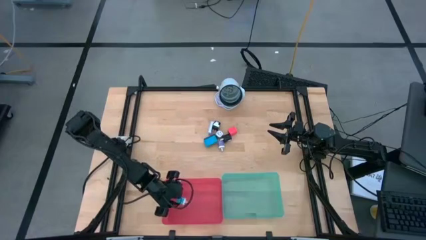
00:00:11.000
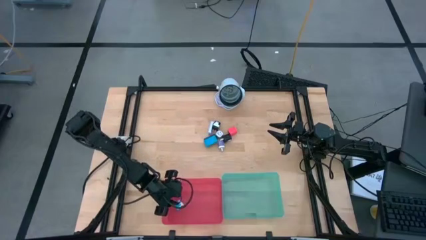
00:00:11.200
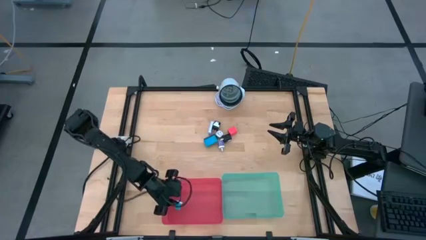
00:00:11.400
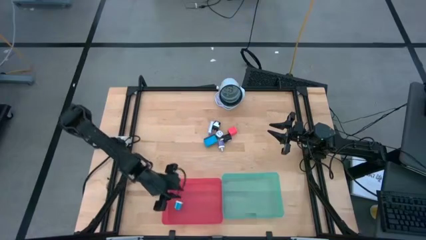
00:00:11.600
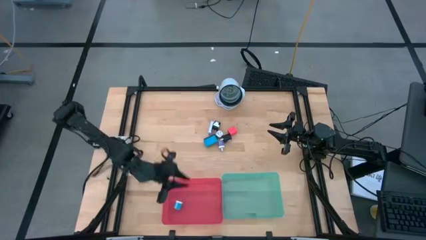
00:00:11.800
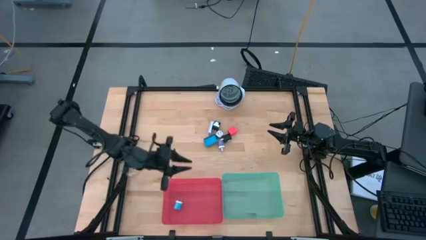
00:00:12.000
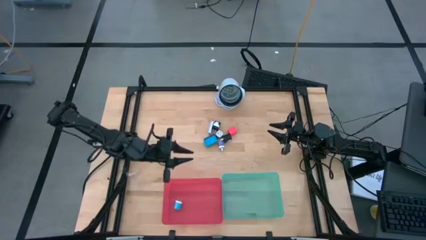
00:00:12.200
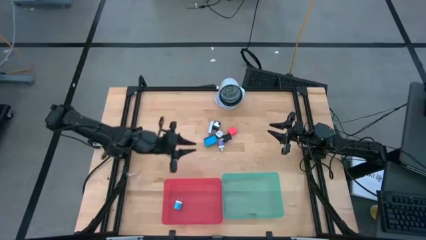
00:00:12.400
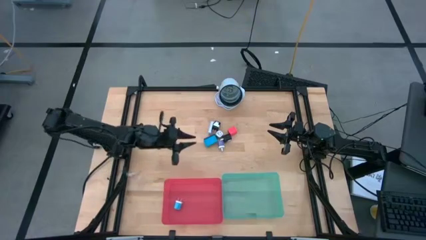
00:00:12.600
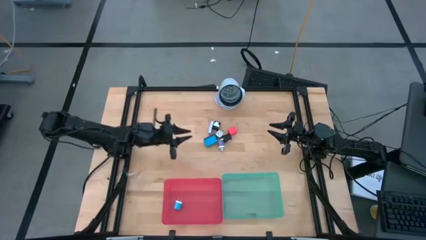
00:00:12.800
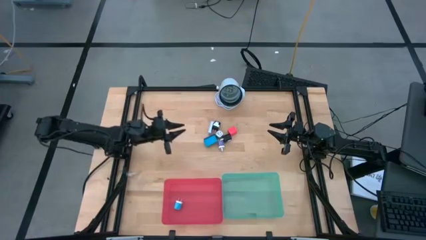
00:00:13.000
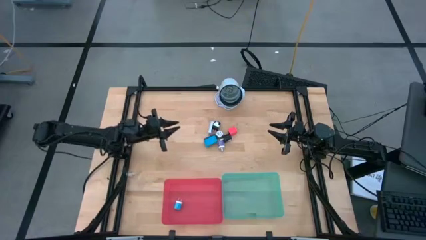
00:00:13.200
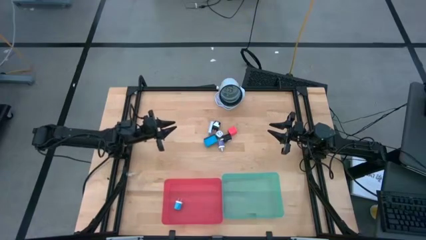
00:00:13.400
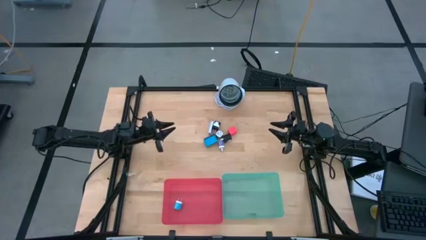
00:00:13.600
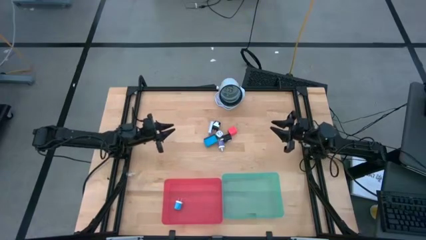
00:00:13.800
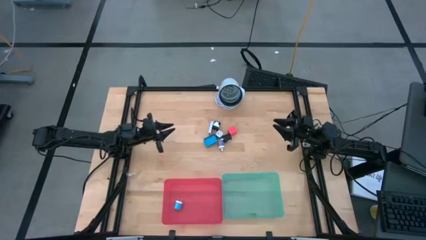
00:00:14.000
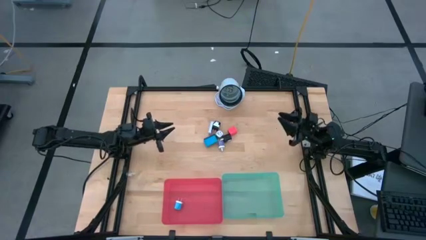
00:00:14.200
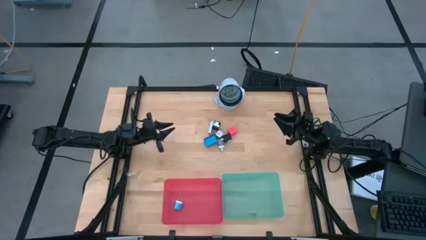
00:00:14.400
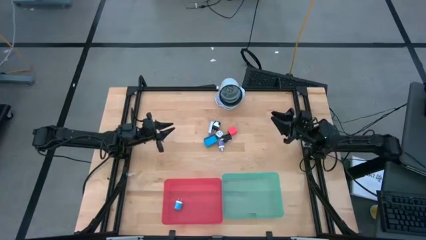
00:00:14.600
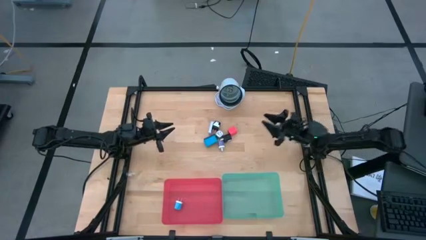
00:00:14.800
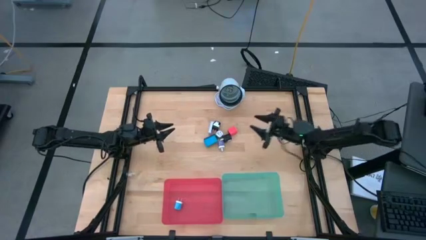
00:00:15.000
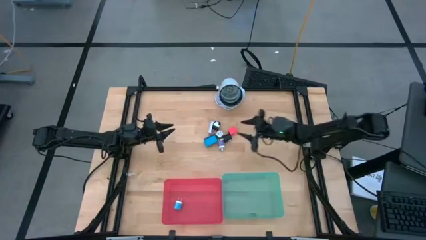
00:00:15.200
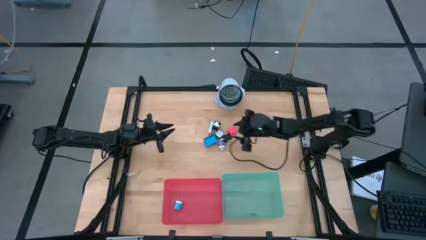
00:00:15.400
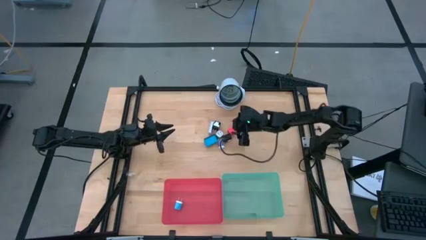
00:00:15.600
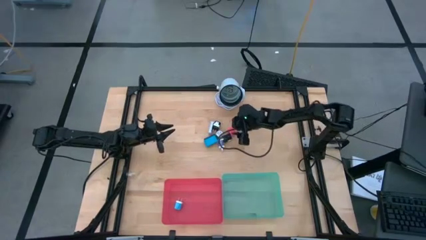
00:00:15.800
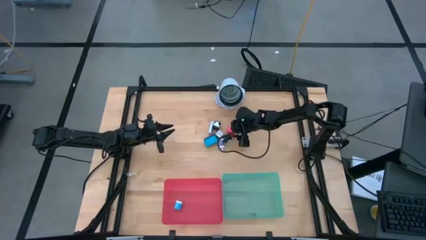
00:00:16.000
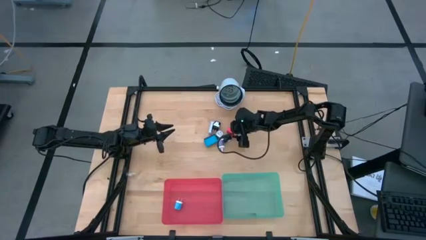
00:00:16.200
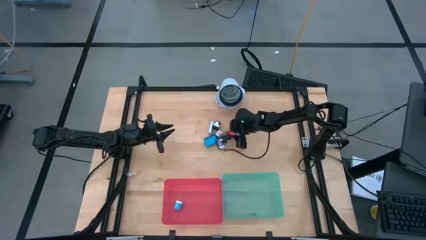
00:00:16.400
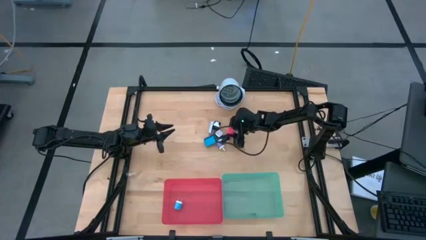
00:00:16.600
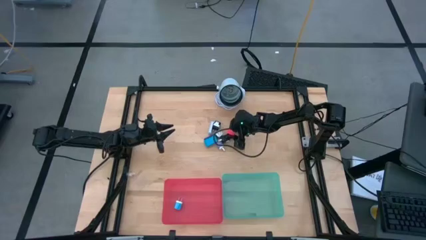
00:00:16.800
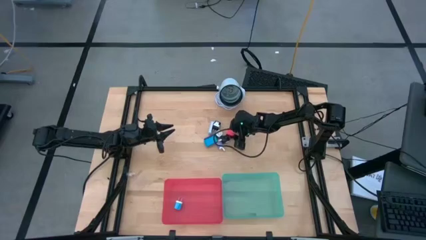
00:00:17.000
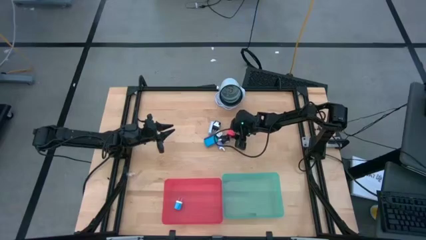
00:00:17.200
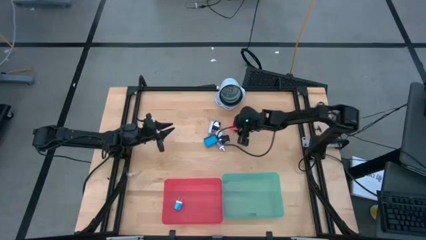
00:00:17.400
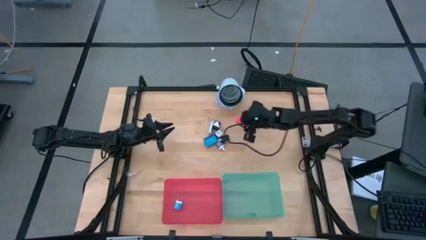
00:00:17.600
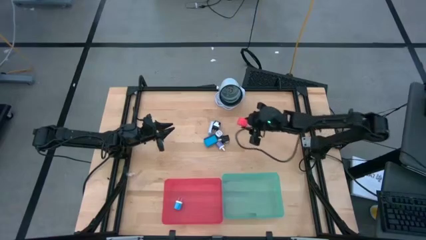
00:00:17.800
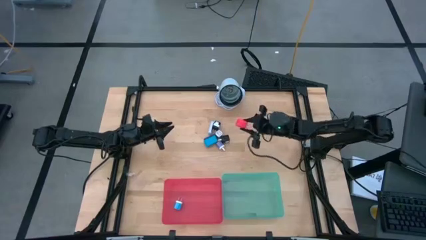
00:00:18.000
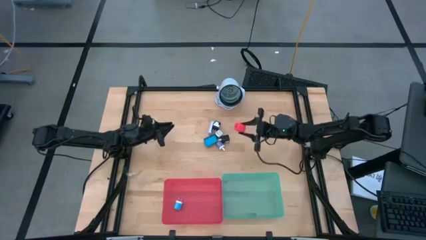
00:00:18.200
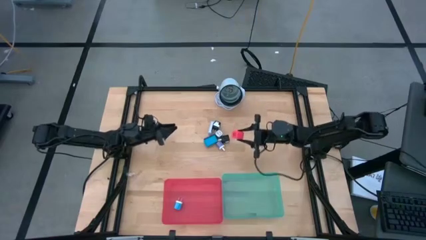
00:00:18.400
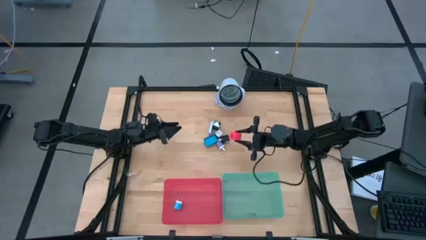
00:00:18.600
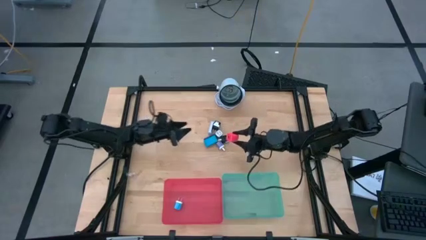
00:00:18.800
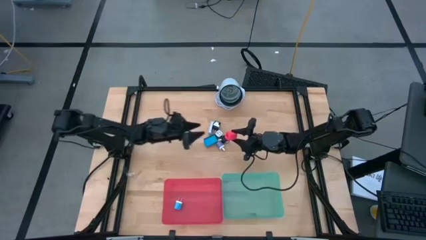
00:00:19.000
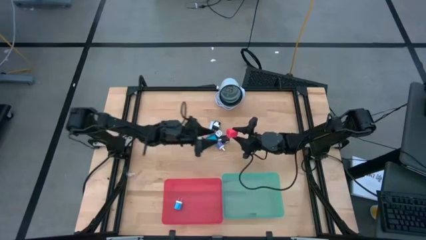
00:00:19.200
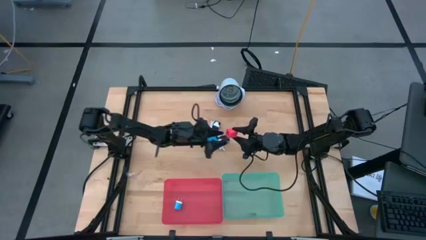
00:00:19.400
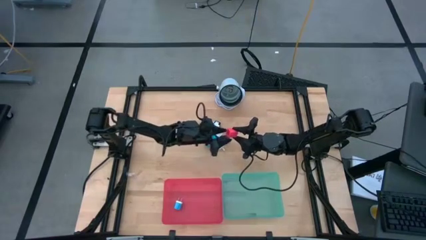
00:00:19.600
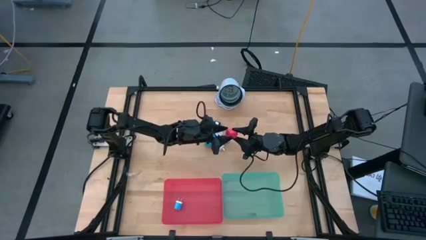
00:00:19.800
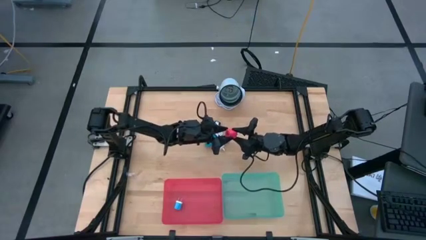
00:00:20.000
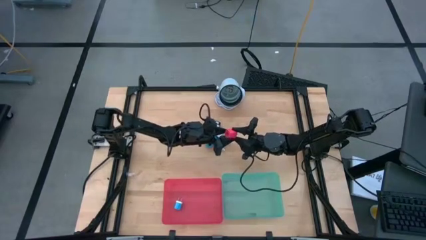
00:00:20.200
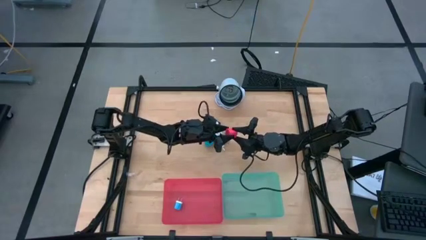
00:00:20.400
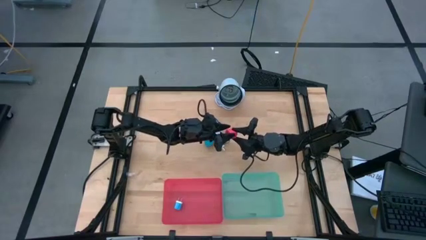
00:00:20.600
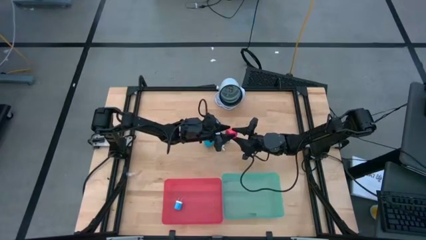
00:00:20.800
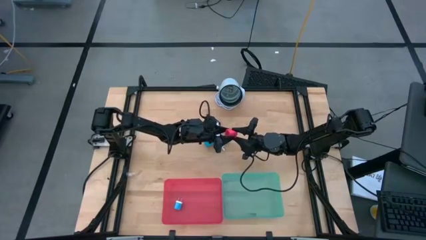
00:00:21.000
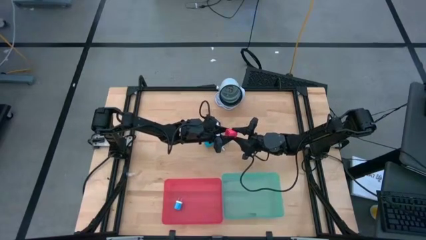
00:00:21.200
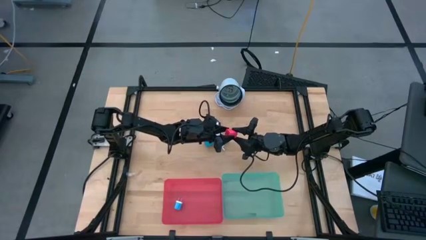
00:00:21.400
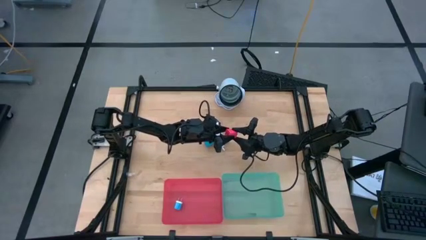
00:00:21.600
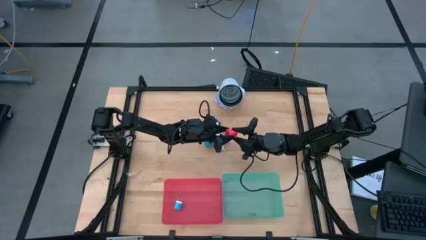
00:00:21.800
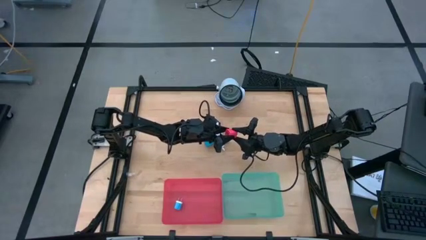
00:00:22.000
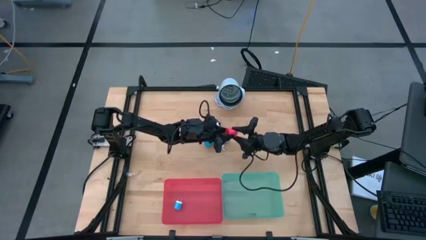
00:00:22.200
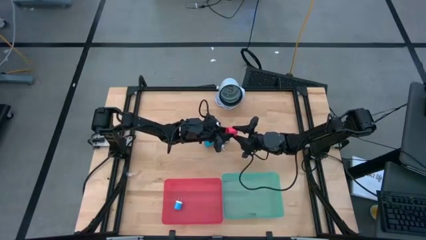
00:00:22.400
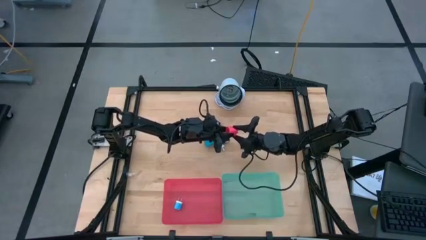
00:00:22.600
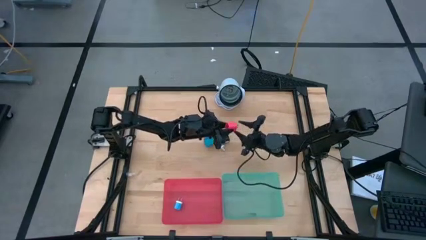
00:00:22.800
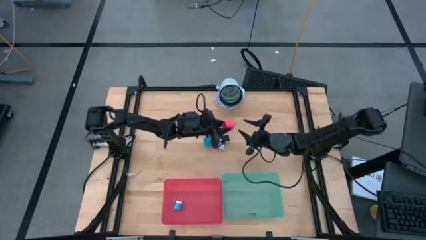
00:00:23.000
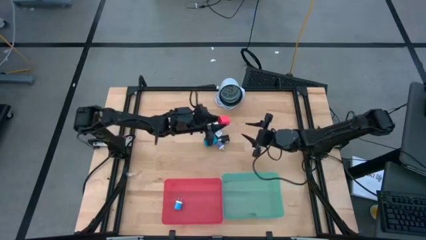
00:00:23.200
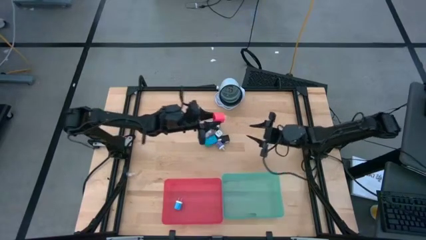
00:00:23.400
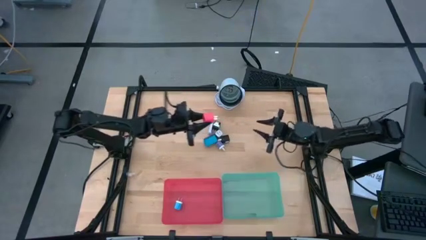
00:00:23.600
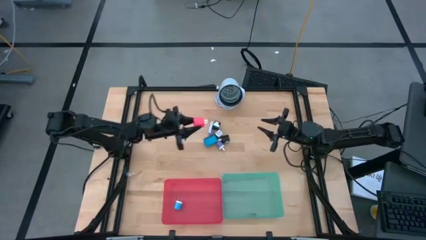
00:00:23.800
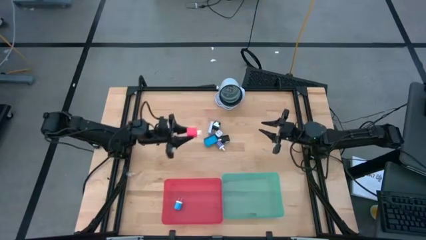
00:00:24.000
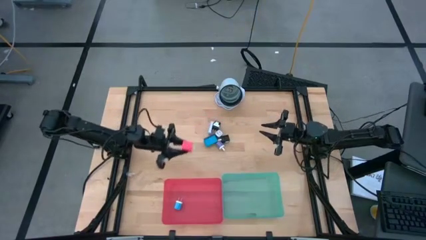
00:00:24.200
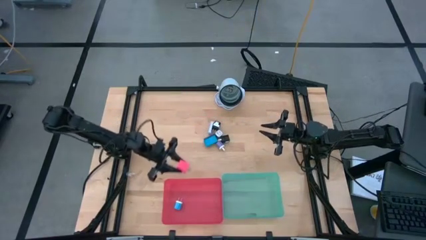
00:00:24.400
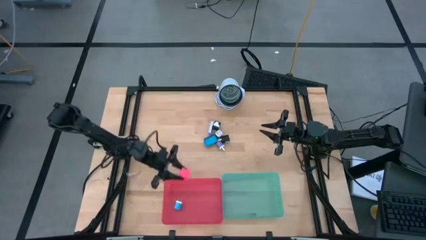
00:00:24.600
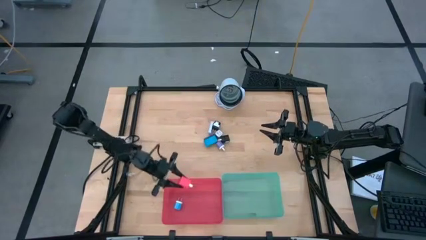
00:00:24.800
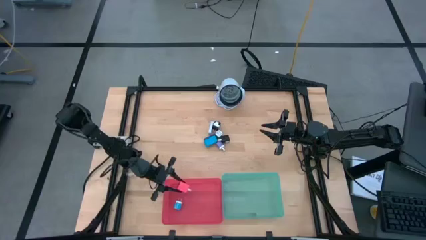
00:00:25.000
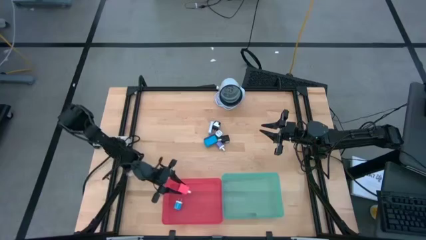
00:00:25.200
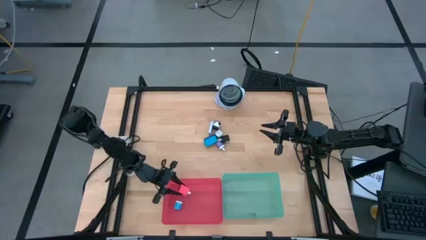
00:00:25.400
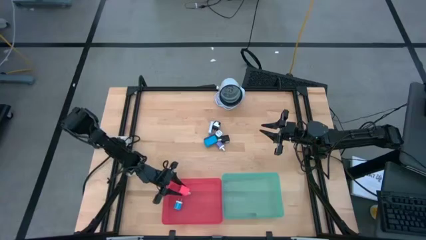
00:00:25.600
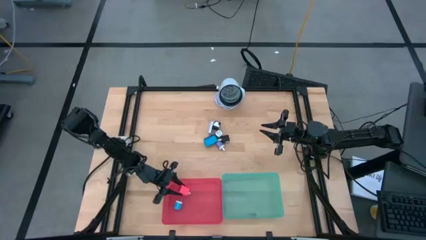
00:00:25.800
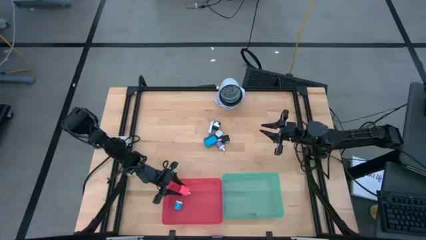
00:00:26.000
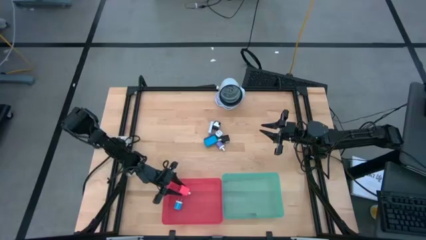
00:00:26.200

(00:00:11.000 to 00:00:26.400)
Task: Pick & Place Office items
Put the pink charger adapter into the red bin
